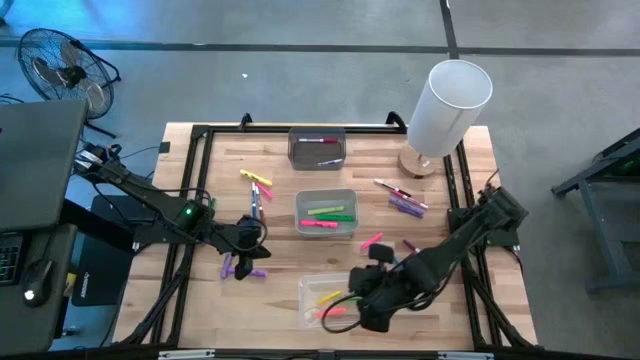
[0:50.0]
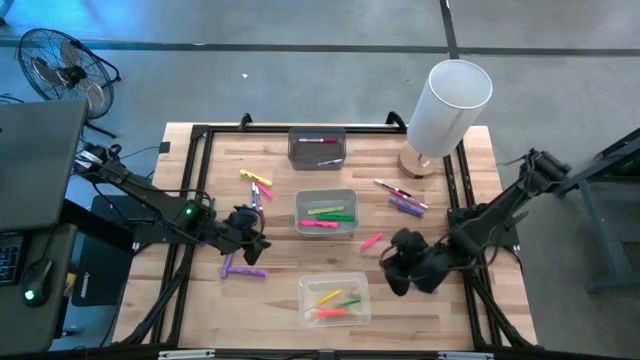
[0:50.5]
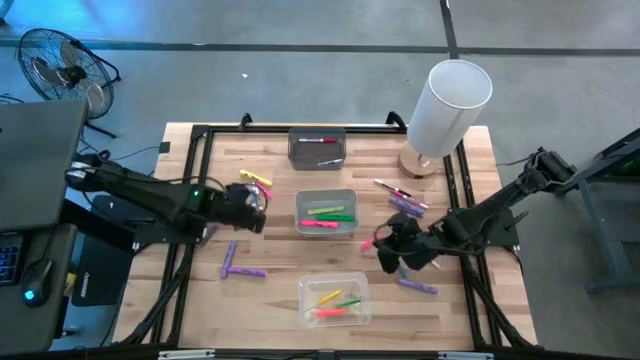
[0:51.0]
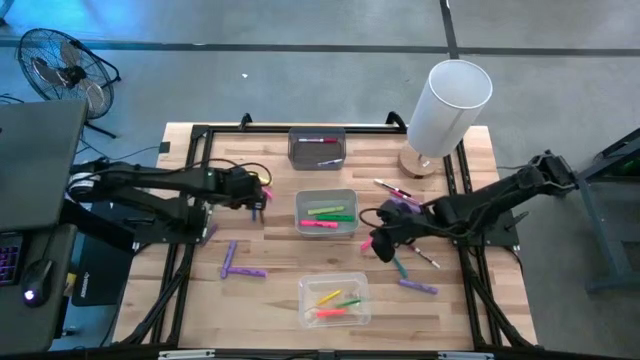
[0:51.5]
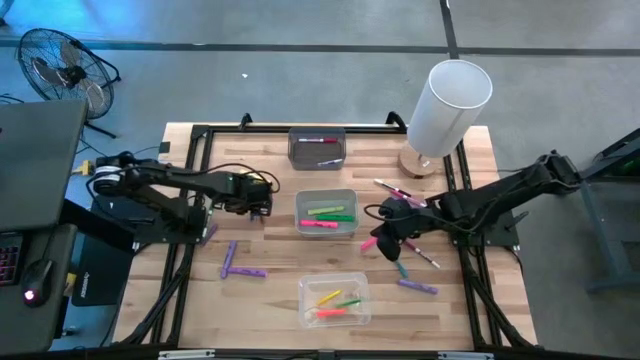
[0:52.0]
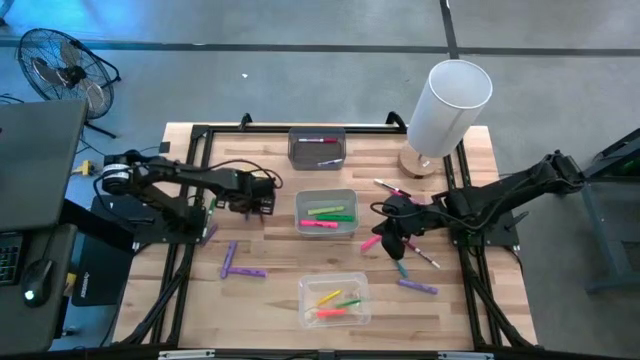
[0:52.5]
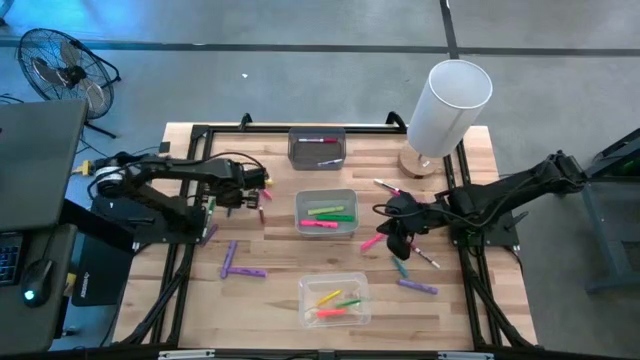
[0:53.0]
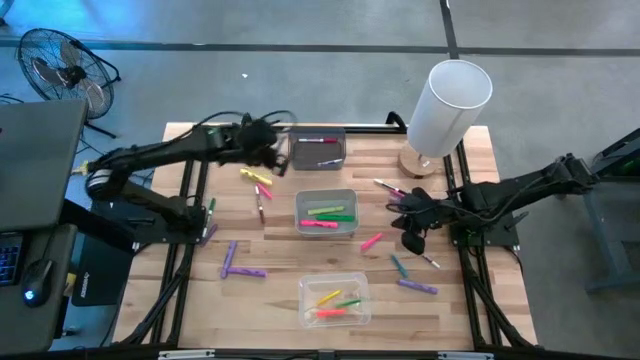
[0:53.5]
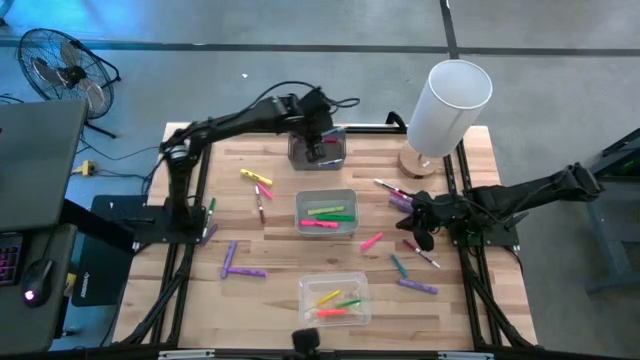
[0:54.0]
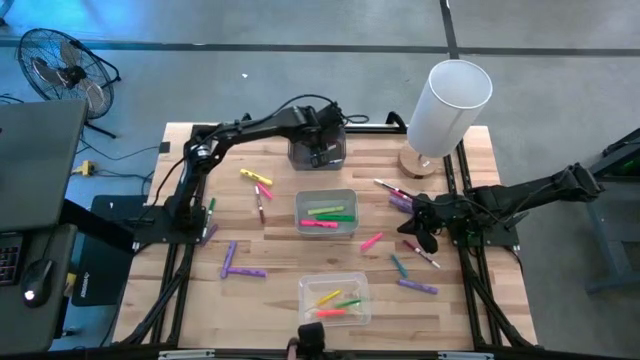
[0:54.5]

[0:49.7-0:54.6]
Task: Pick & Place Markers
Put the blue marker pen into the black bin

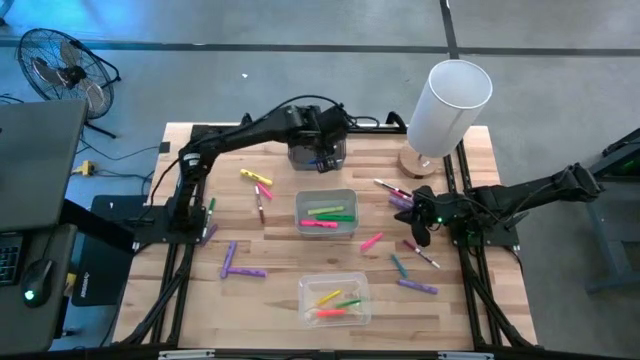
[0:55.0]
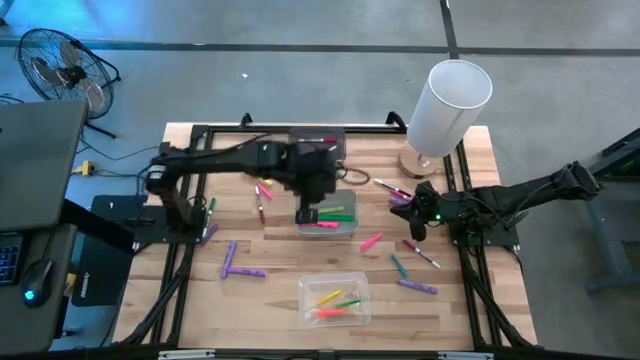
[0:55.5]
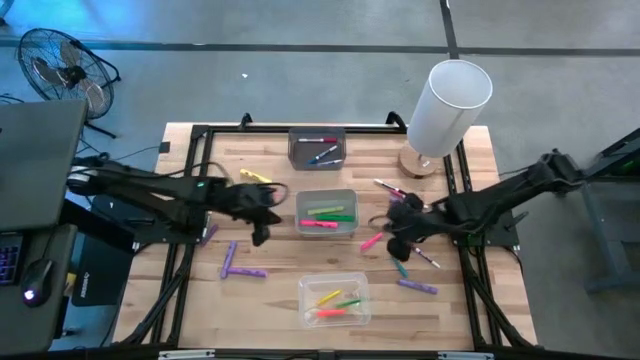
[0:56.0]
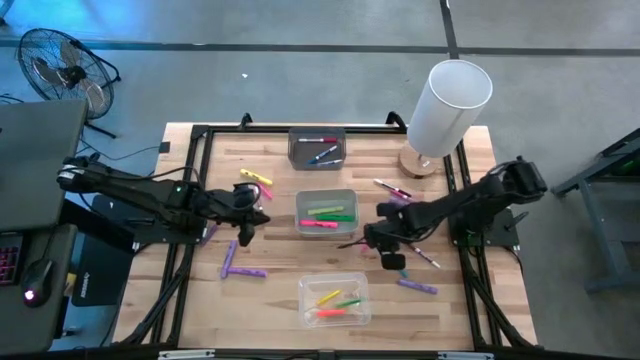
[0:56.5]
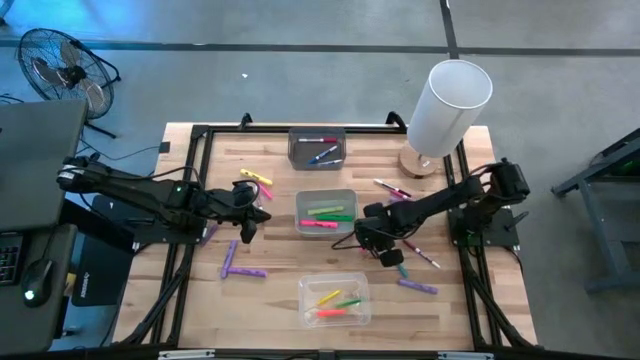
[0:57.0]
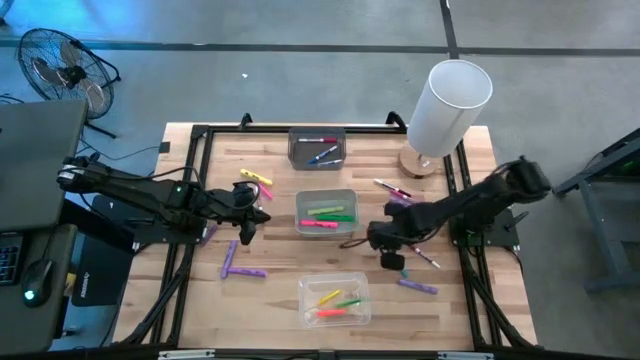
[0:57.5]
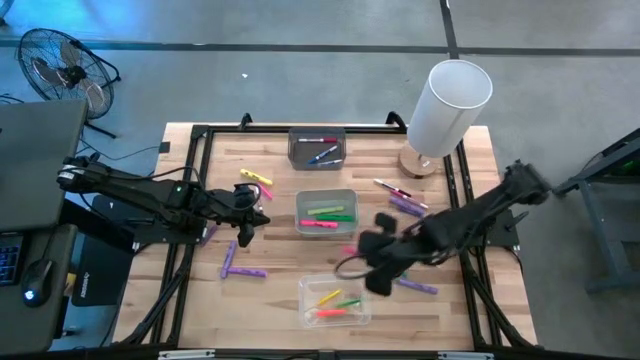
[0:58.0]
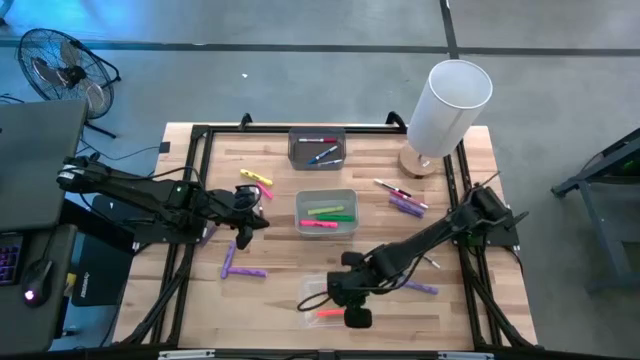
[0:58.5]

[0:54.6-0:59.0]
Put the pink pen into the transparent bin

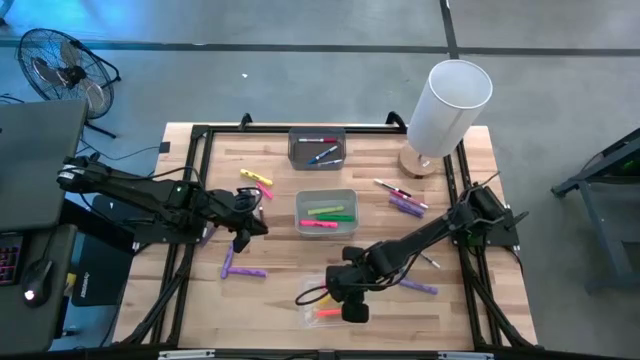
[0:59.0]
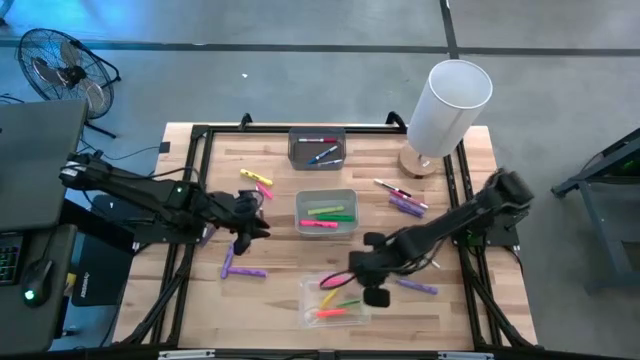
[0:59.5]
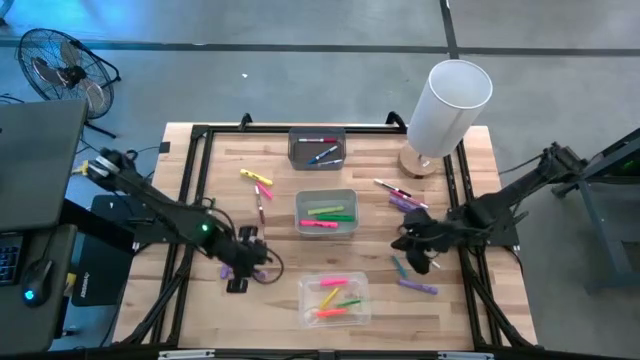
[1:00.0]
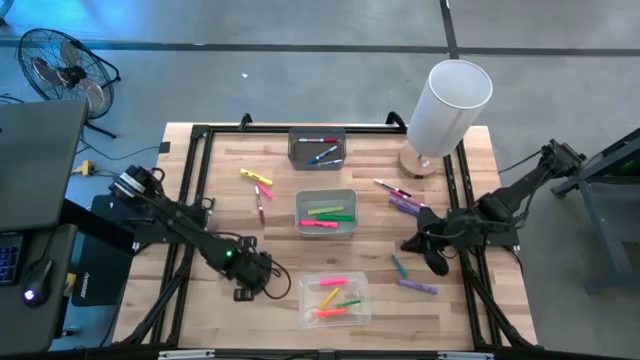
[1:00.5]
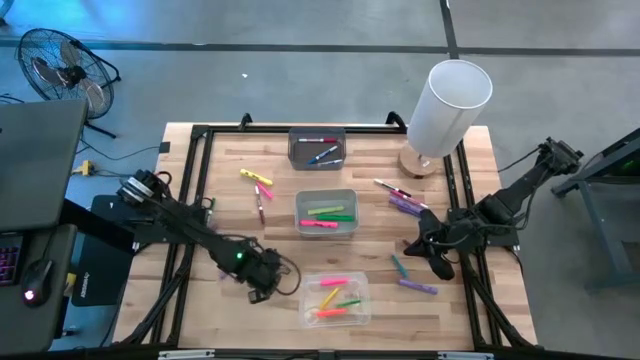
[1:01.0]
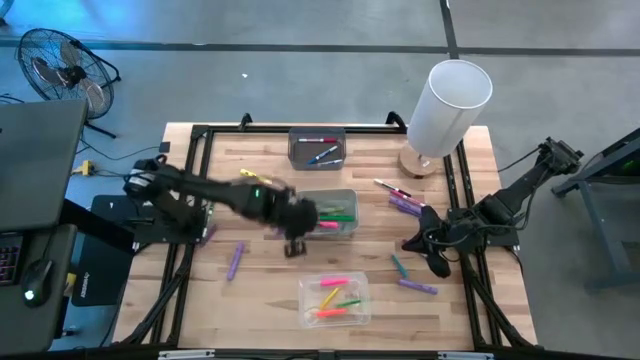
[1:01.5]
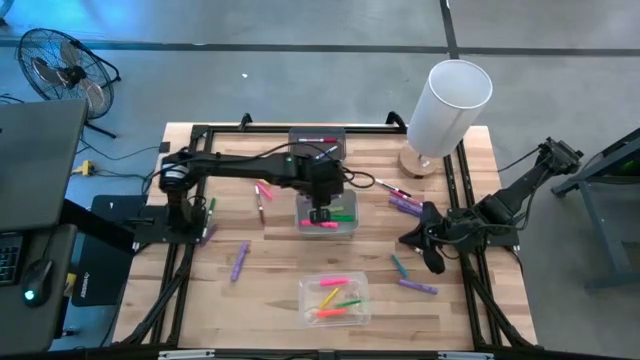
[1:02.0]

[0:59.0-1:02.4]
Put the purple highlighter pen into the gray bin

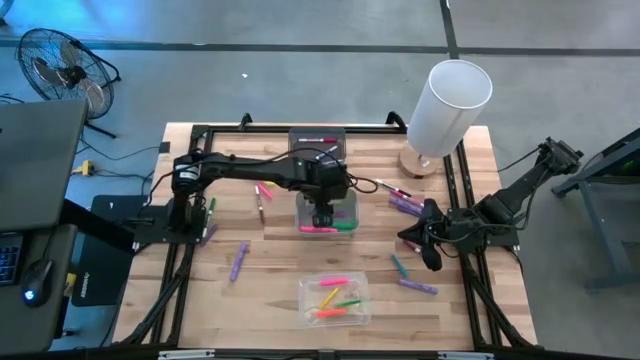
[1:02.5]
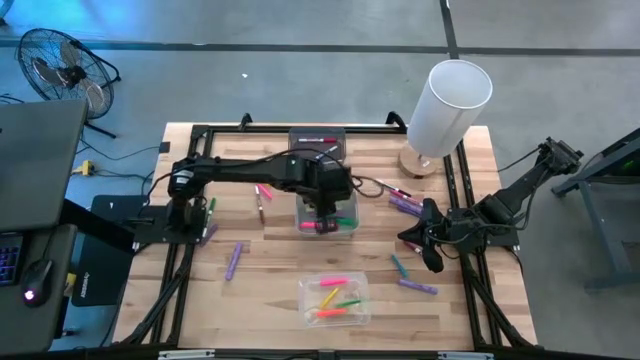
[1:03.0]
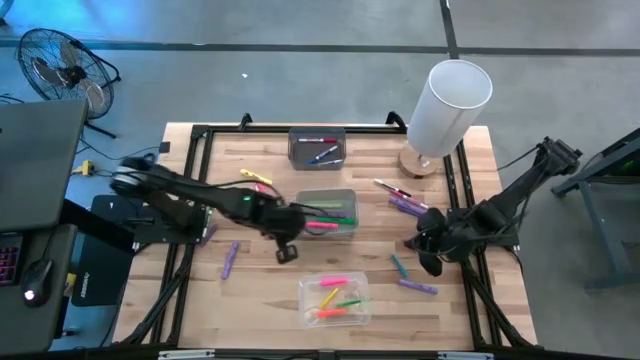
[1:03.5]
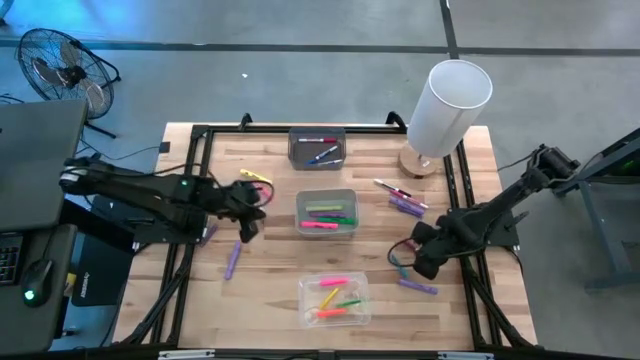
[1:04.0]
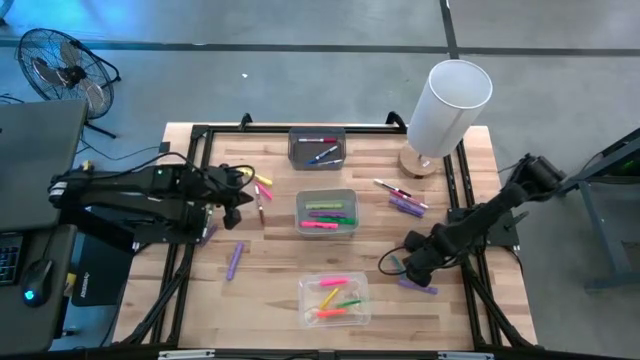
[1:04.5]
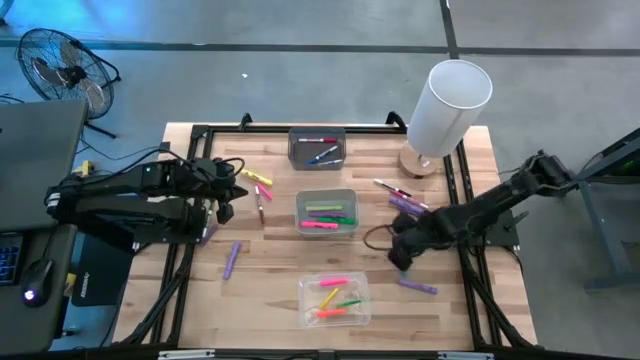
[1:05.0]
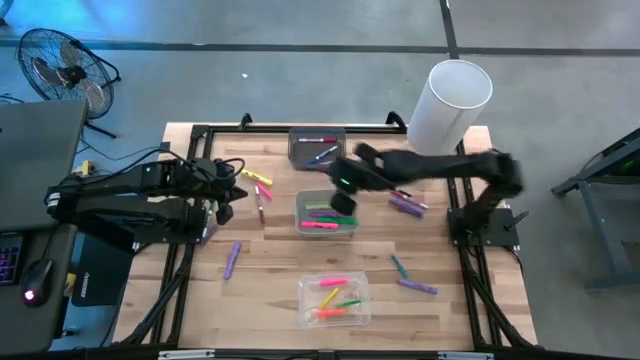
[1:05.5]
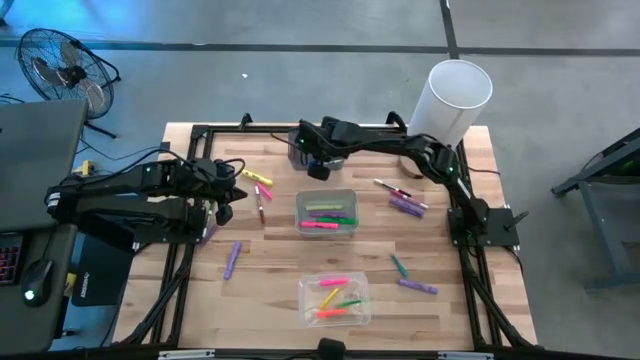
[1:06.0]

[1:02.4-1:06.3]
Put the dark red marker pen into the black bin

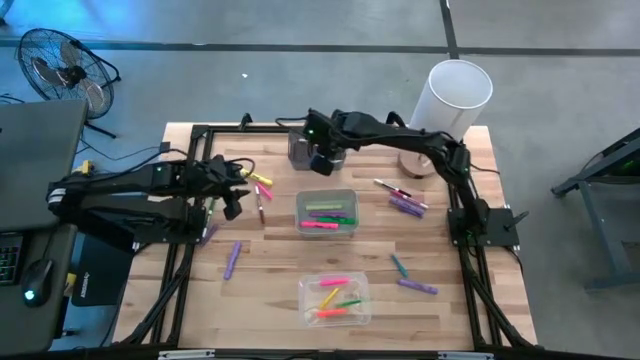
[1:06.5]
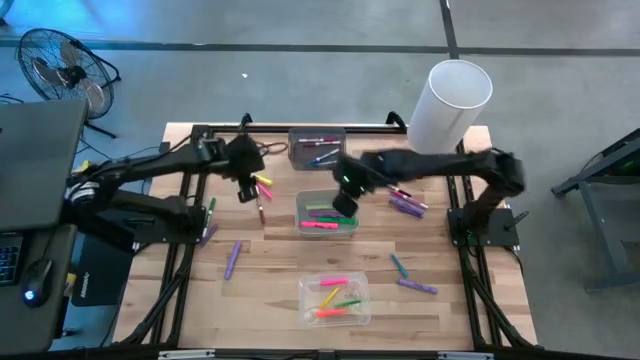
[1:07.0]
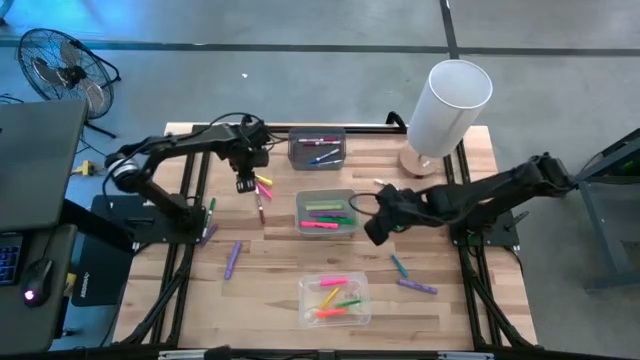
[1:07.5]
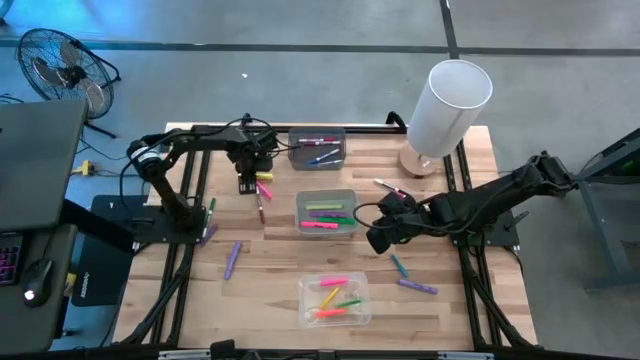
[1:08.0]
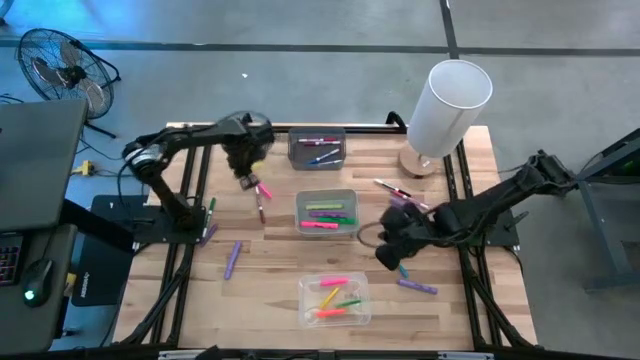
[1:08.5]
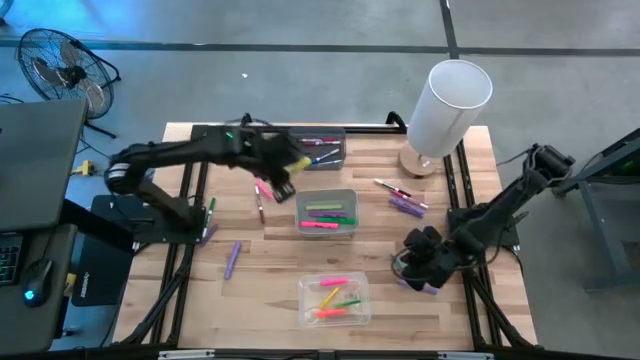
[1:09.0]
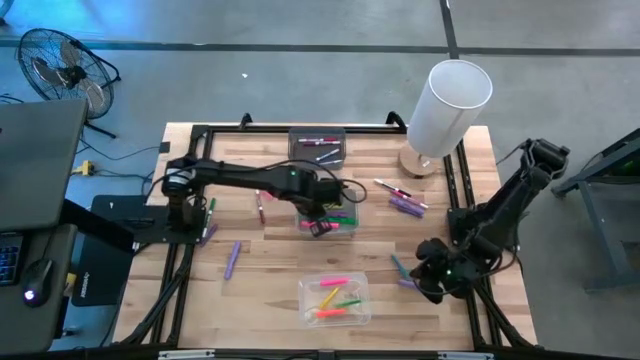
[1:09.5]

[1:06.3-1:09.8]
Put the yellow highlighter pen into the gray bin

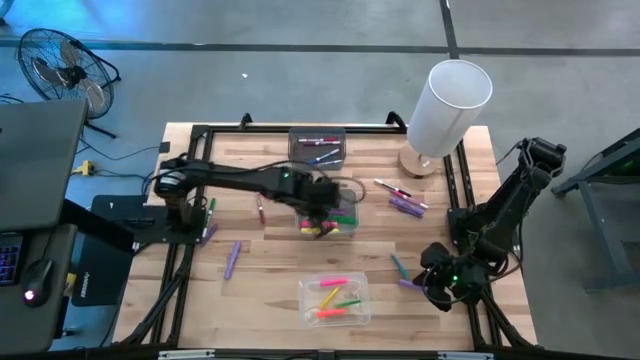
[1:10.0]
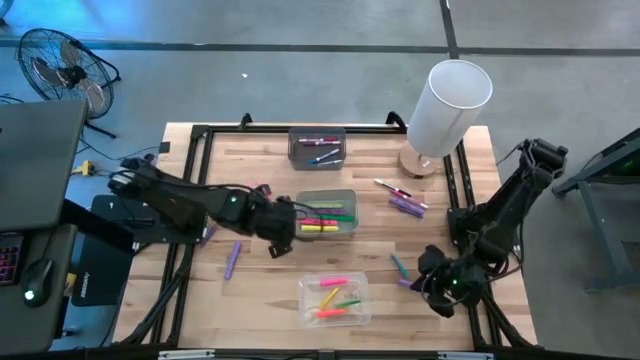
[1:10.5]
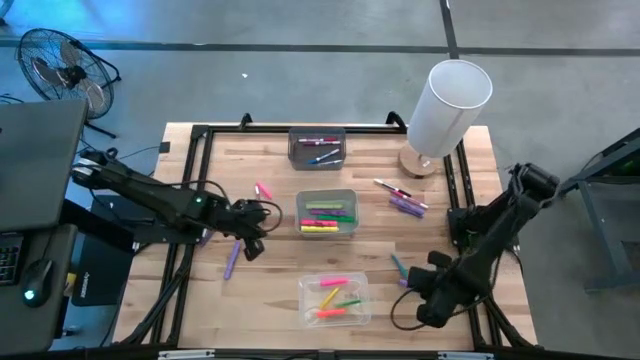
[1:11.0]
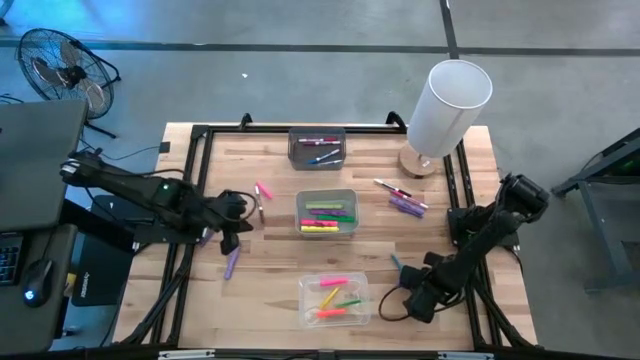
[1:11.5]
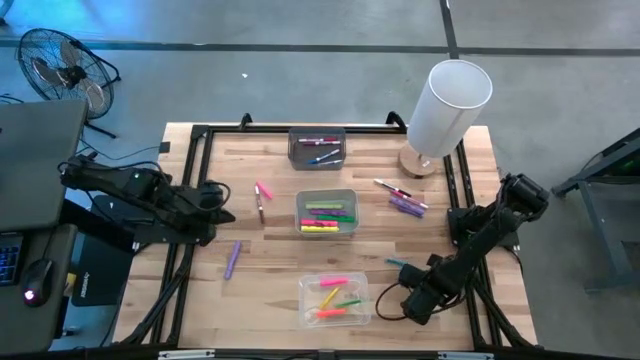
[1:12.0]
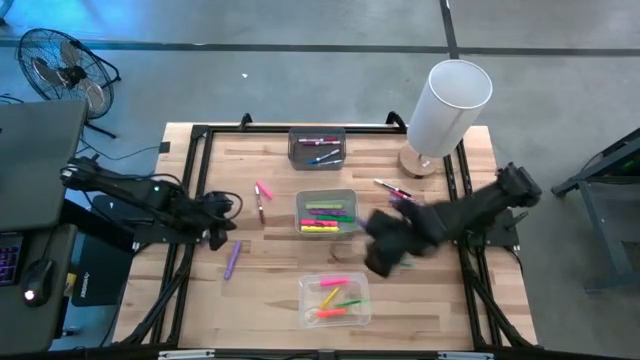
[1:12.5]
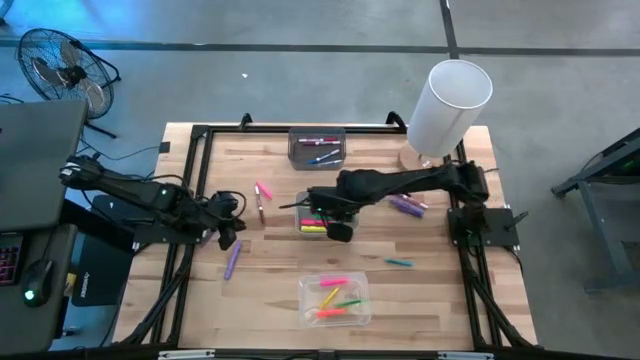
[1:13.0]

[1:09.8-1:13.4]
Put the purple highlighter pen into the gray bin
